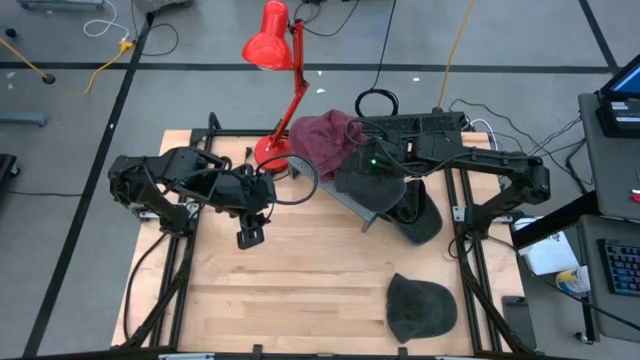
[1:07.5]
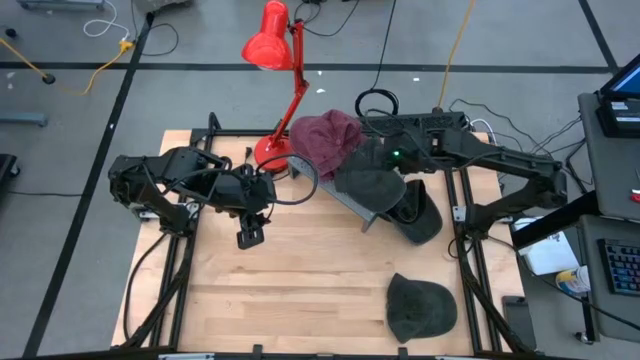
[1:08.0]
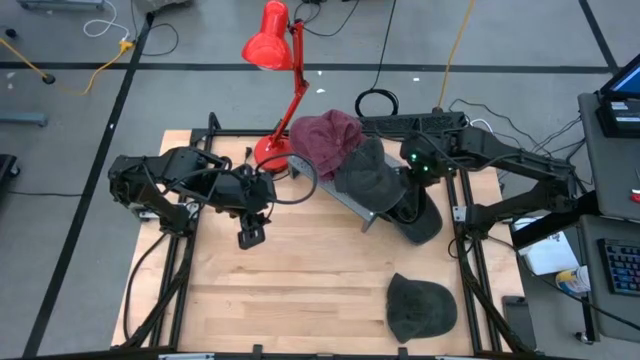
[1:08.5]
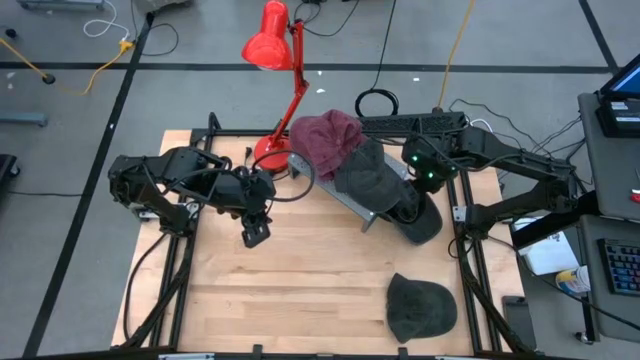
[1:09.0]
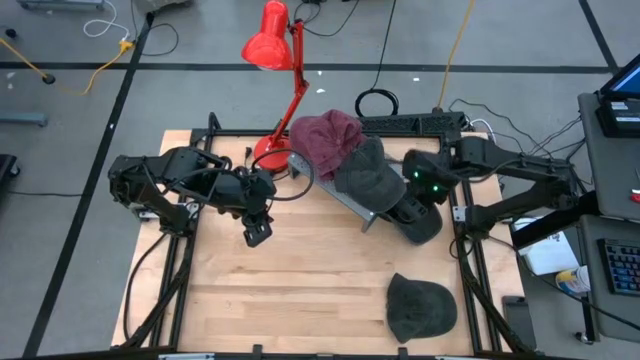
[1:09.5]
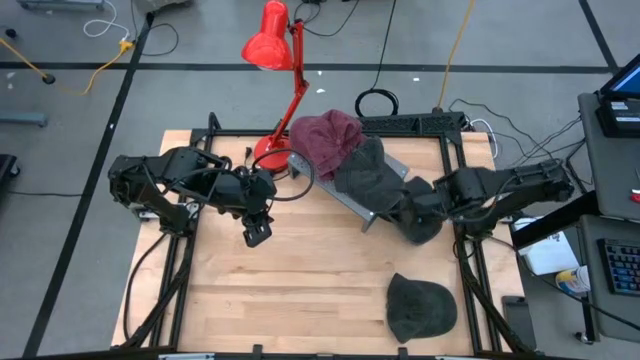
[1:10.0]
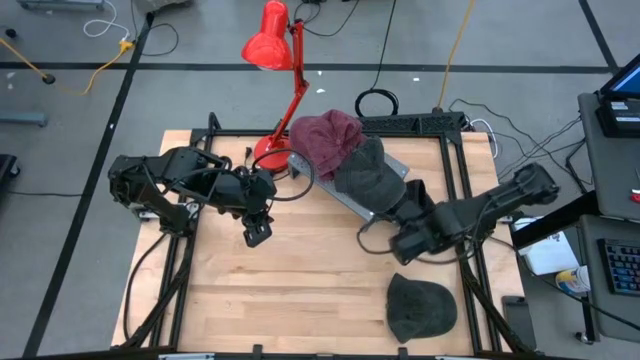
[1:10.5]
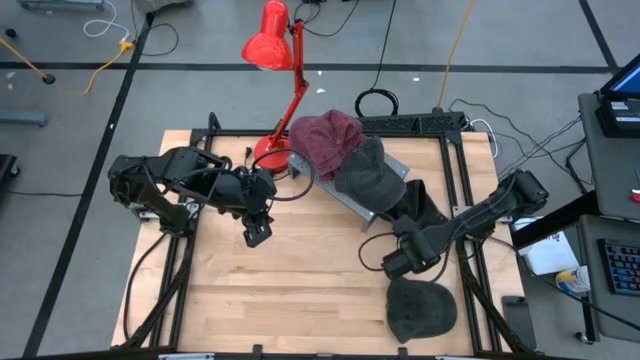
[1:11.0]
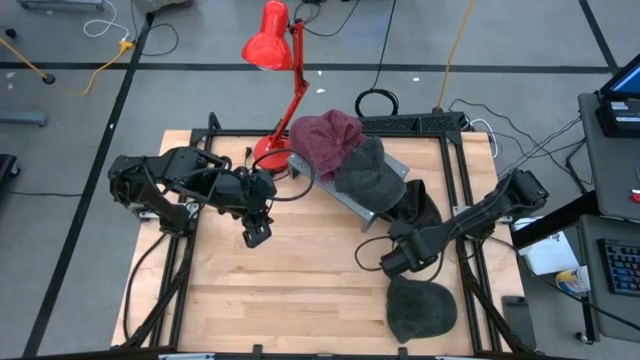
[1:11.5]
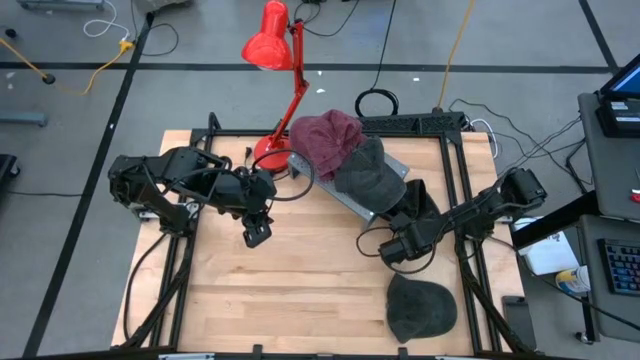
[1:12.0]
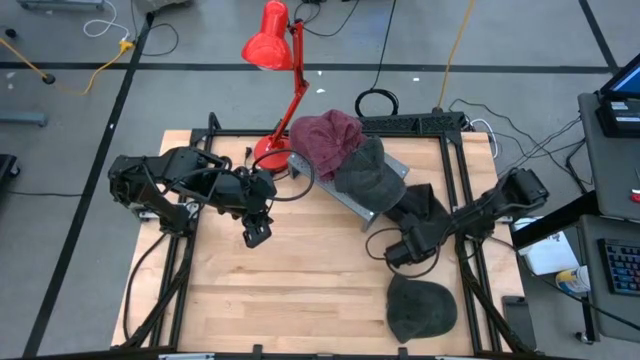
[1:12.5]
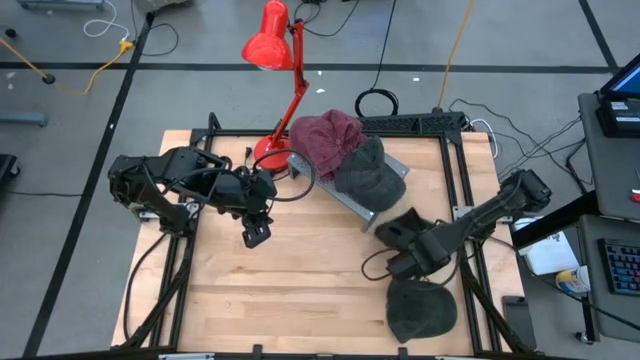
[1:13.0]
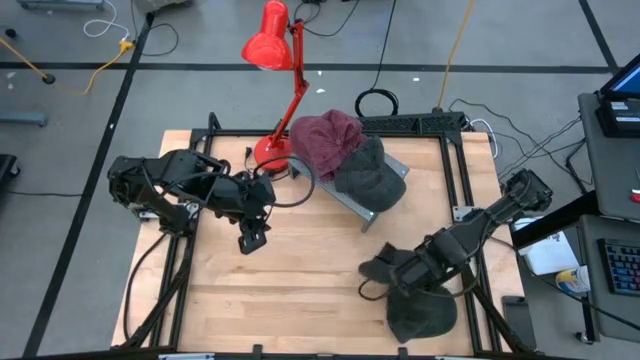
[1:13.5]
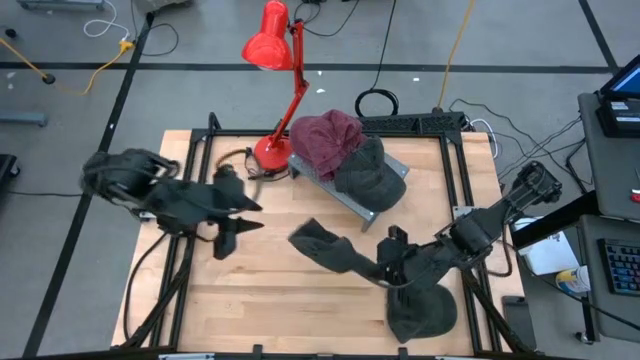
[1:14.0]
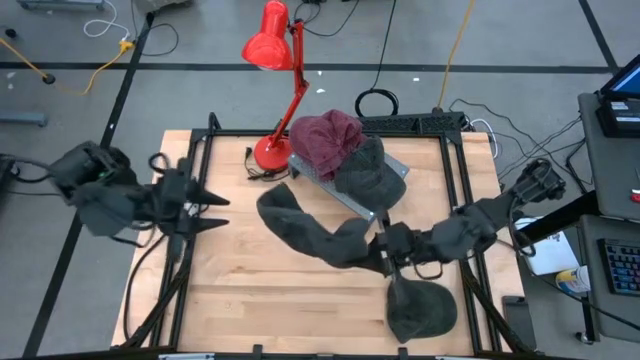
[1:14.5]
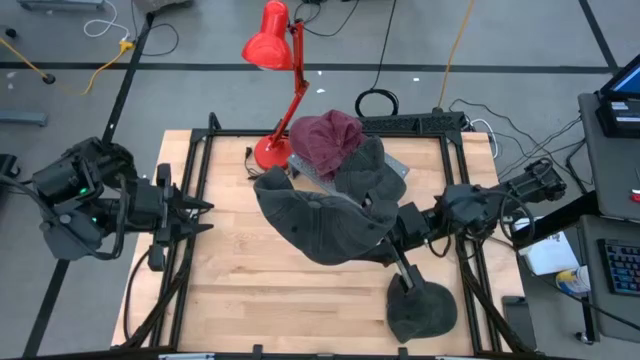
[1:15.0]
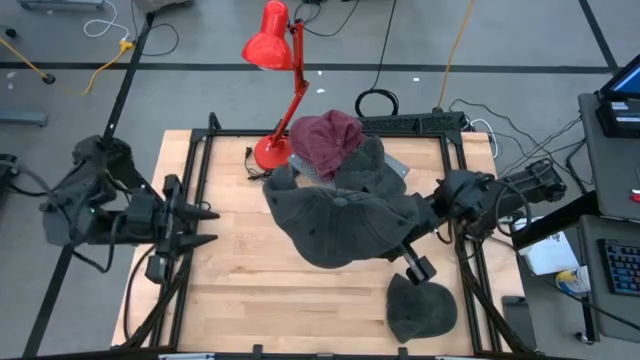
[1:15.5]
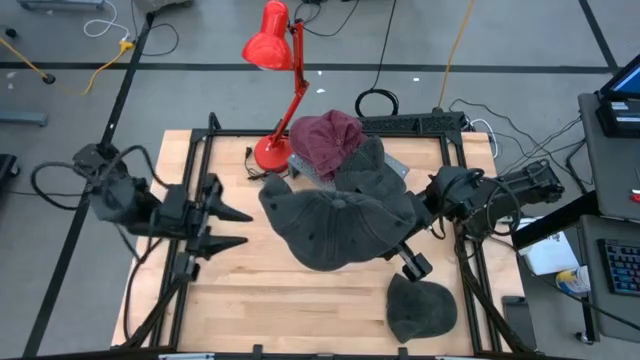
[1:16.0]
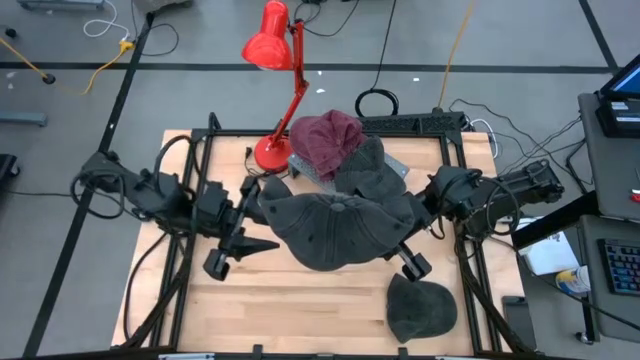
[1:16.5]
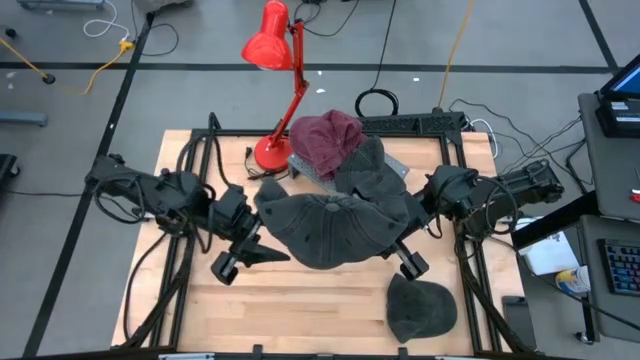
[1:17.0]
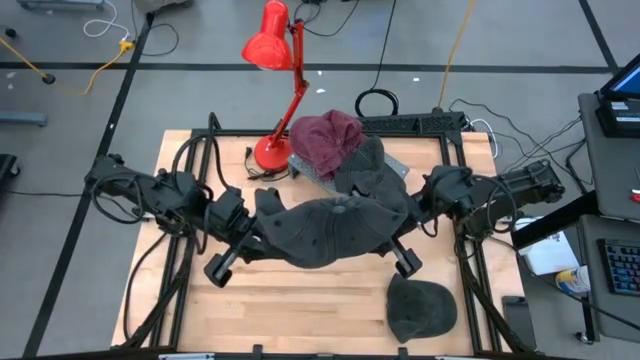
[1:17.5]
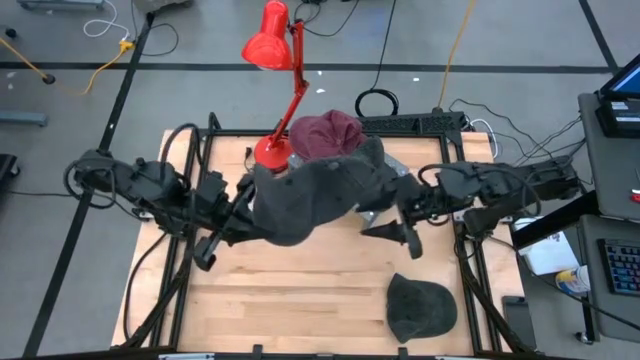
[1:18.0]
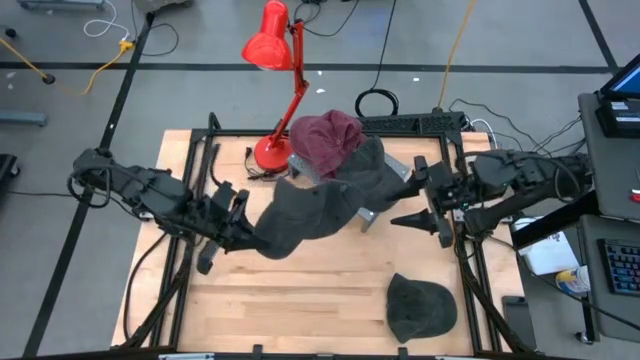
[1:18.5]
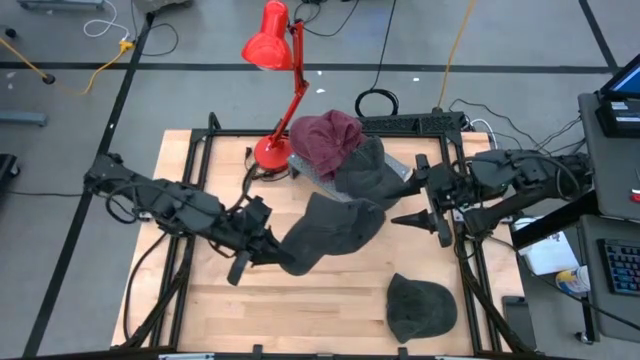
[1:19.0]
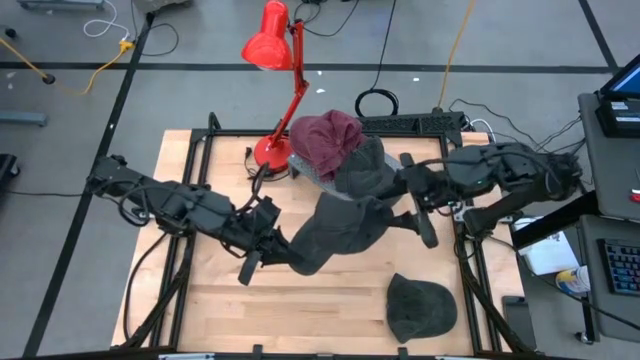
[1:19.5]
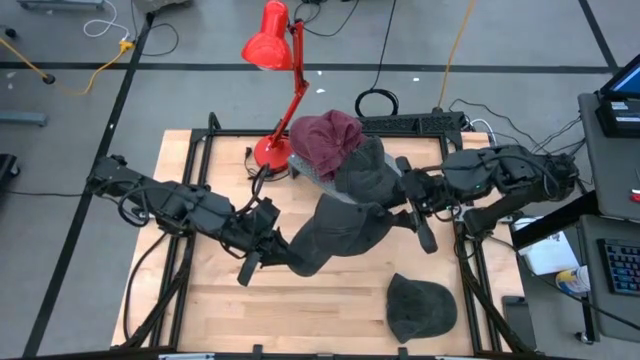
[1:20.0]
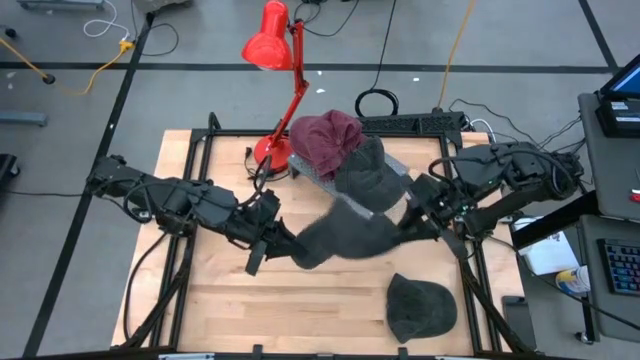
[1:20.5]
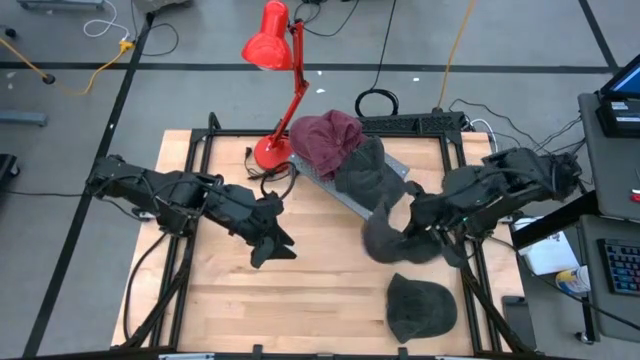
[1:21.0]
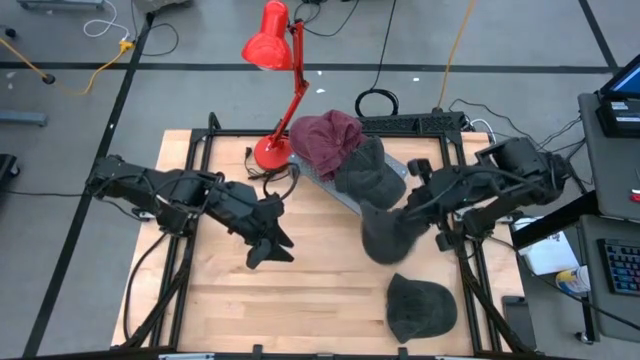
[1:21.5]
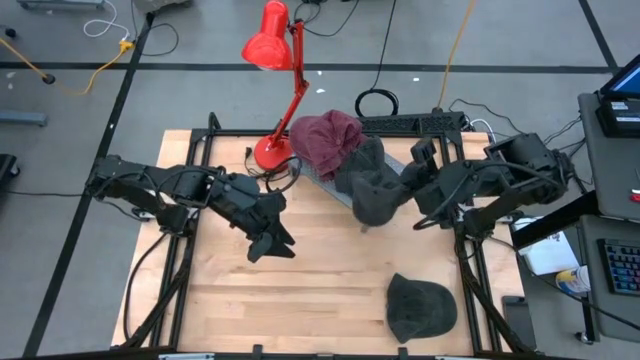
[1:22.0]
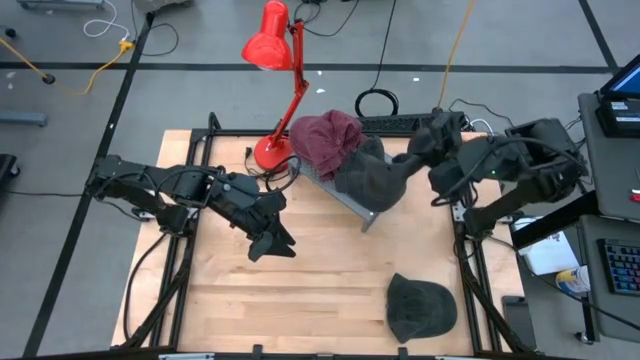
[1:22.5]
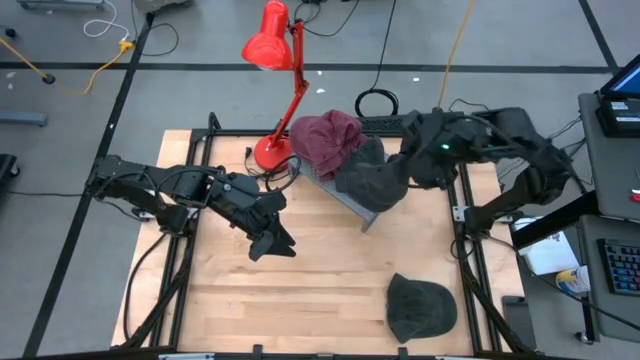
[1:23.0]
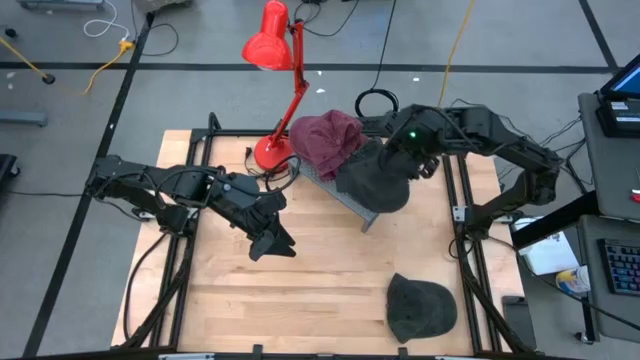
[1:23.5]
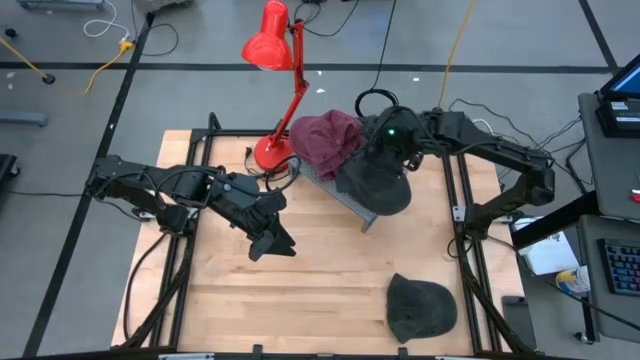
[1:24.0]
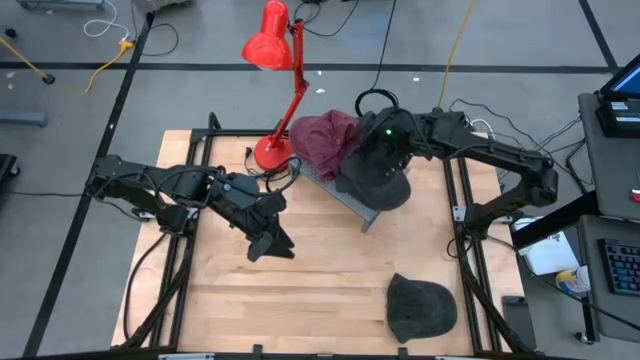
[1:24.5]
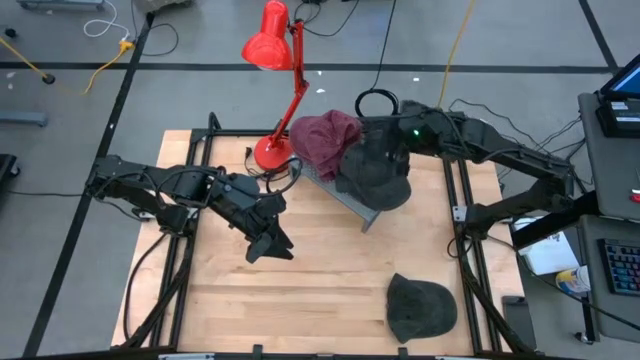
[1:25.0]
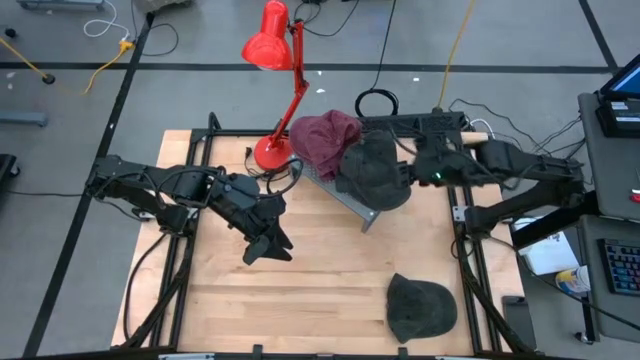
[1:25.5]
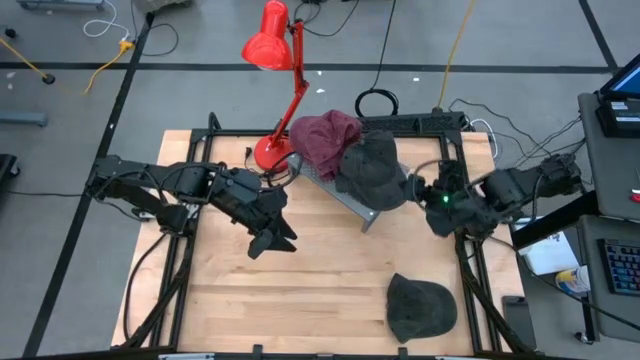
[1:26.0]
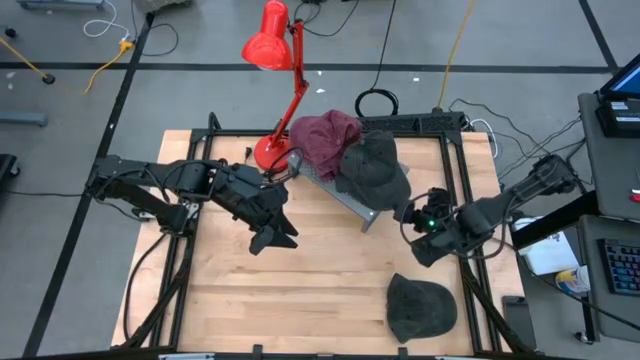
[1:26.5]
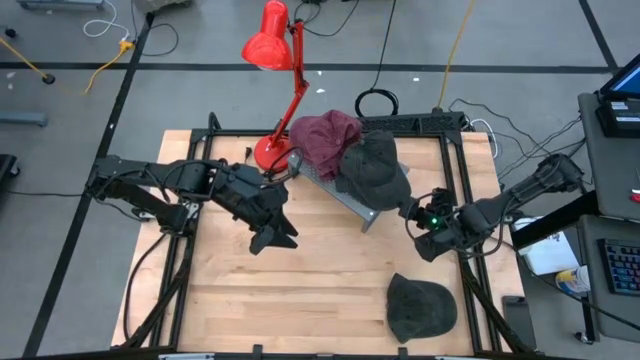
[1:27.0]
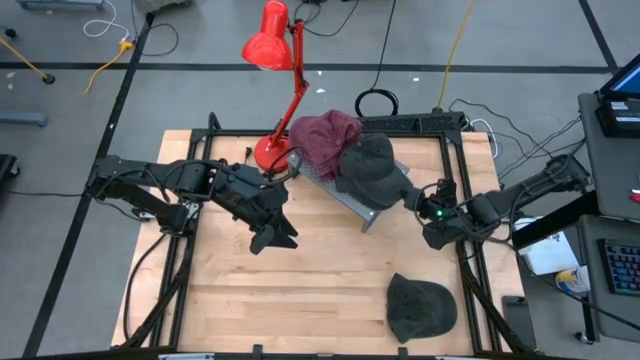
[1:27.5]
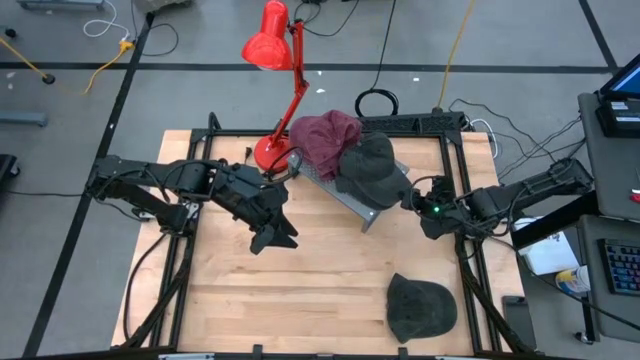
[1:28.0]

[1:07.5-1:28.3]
Task: Pick & Place hat
Stack the black cap on top of the black cap on the shelf

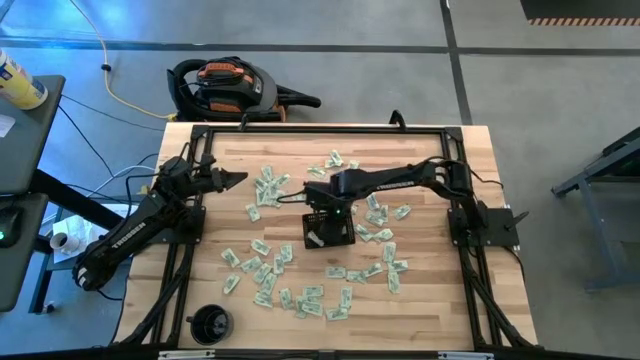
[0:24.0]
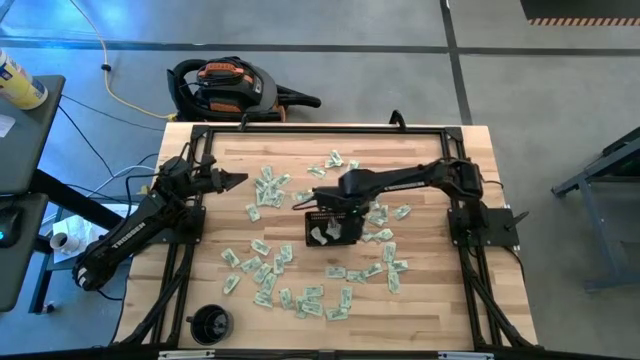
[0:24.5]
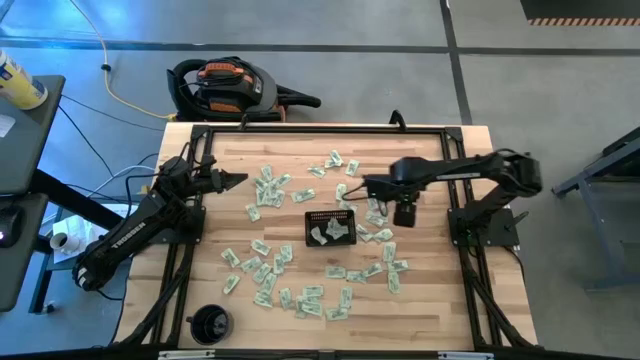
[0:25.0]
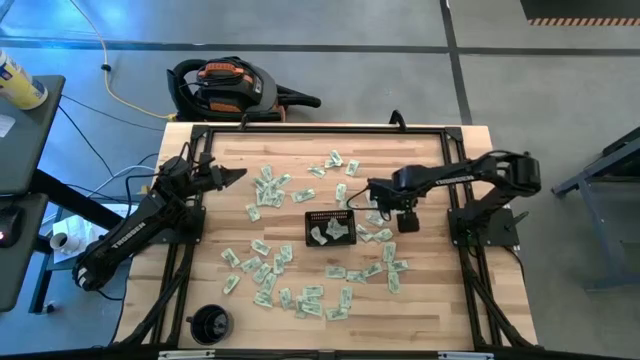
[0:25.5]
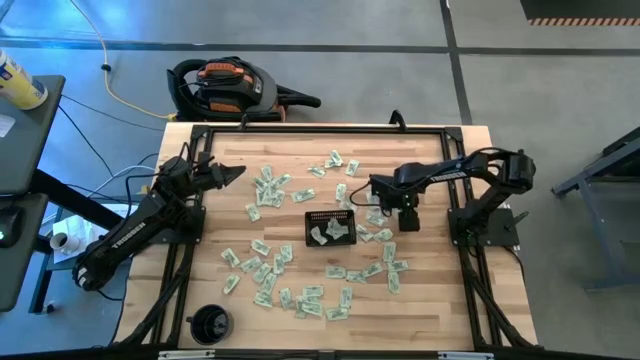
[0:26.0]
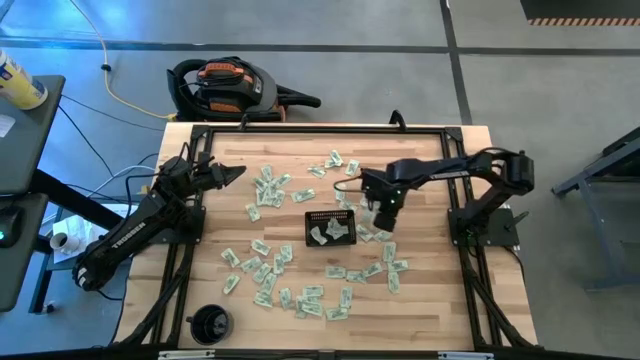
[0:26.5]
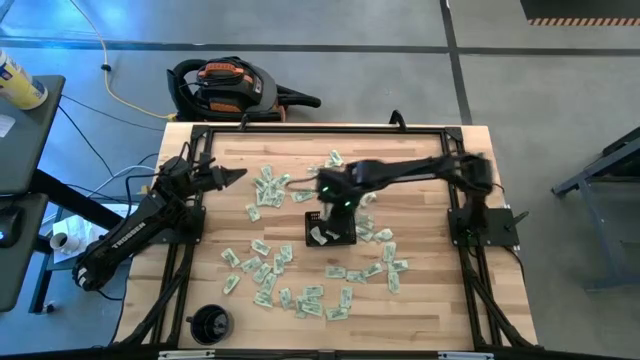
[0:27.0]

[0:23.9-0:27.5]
Task: Pick and place Stevia / Truvia into bins
Put the green stevia packet into the black basket
